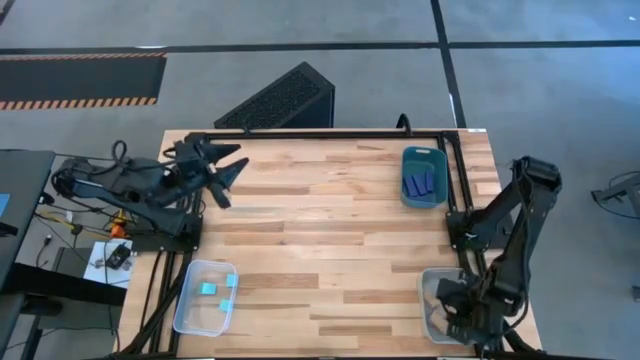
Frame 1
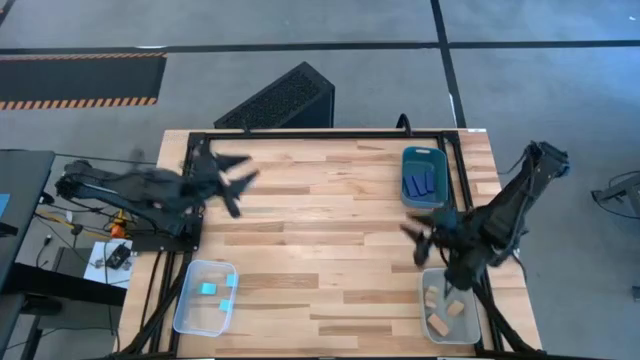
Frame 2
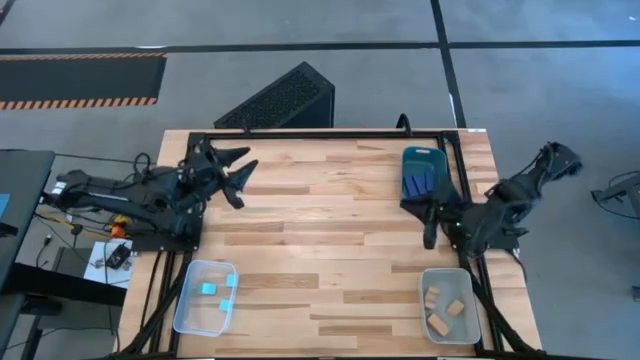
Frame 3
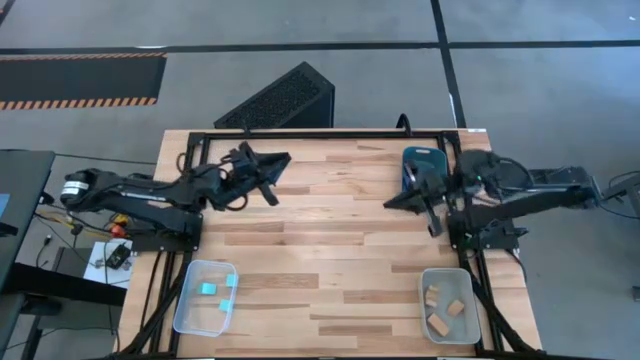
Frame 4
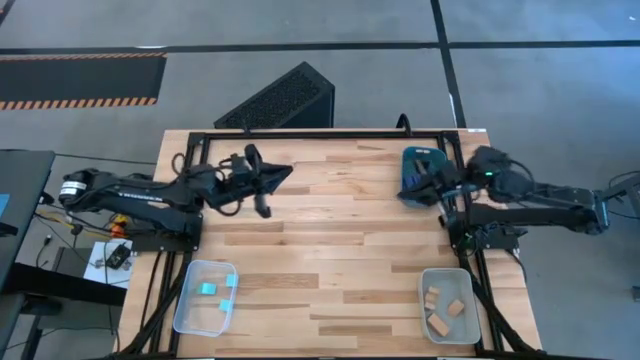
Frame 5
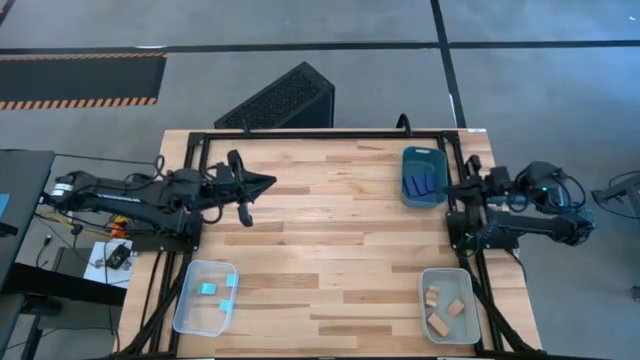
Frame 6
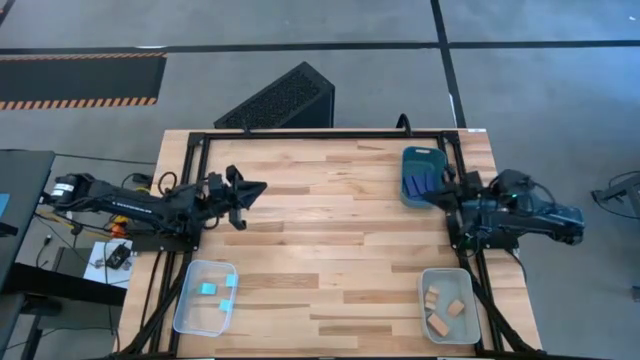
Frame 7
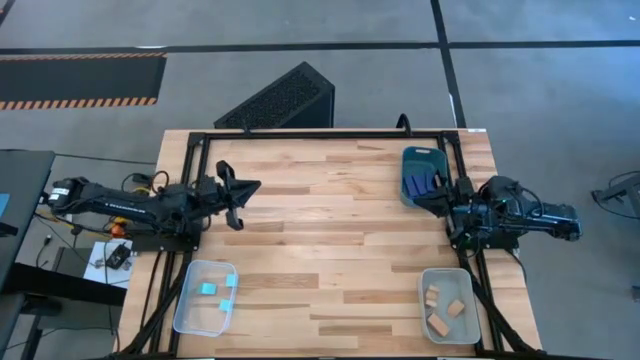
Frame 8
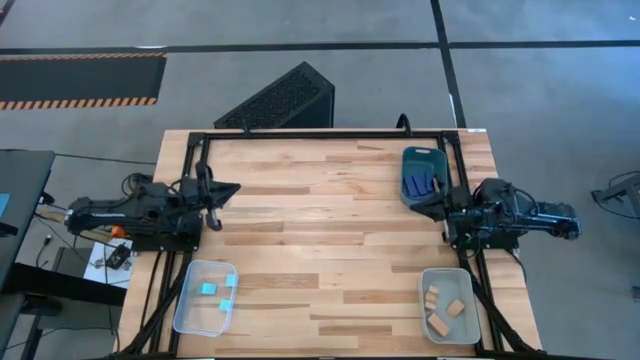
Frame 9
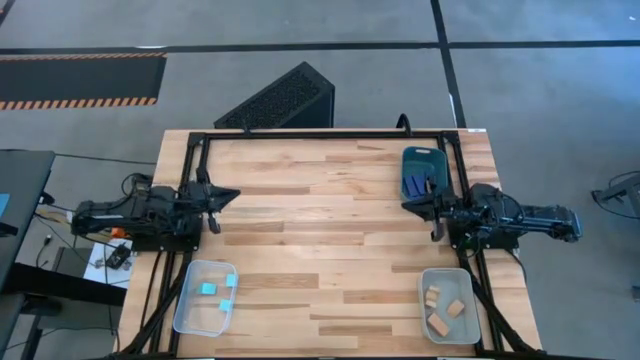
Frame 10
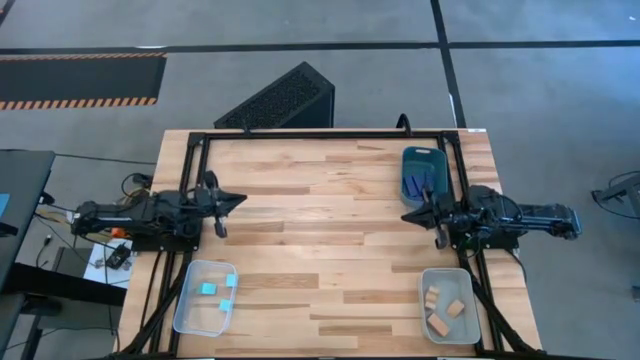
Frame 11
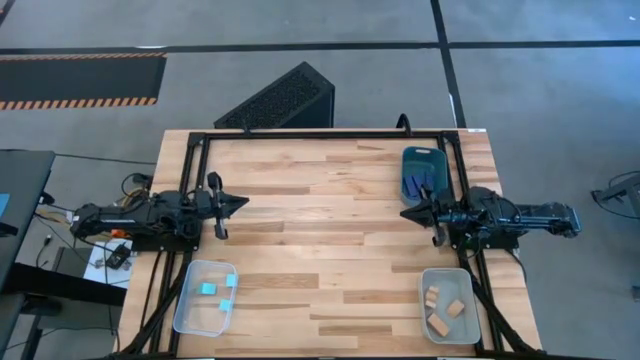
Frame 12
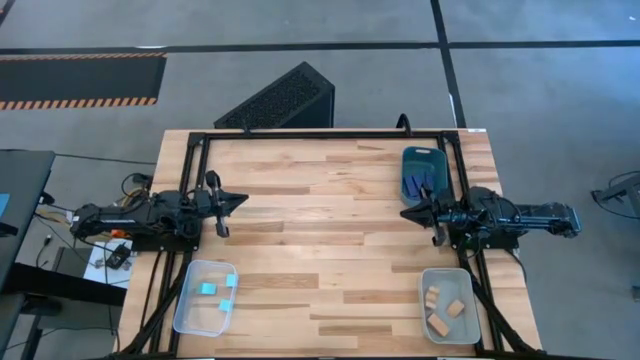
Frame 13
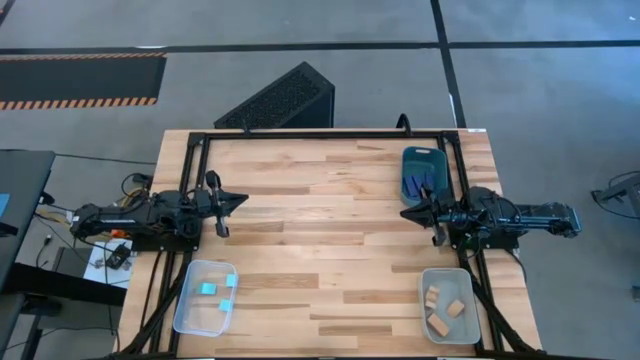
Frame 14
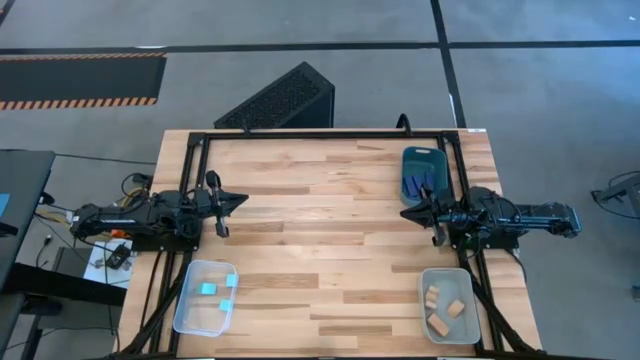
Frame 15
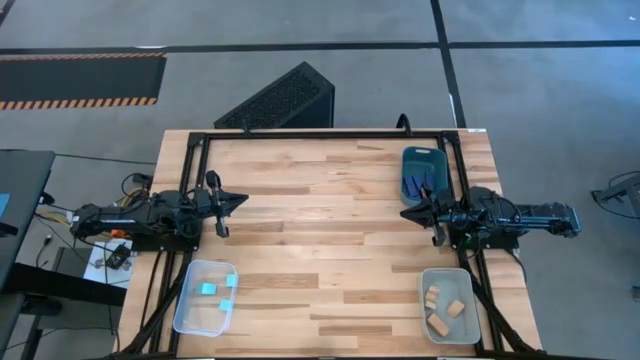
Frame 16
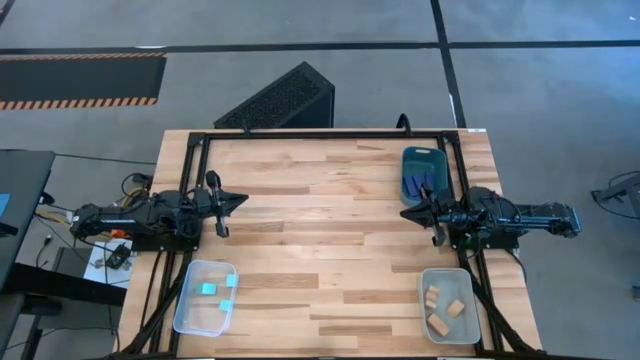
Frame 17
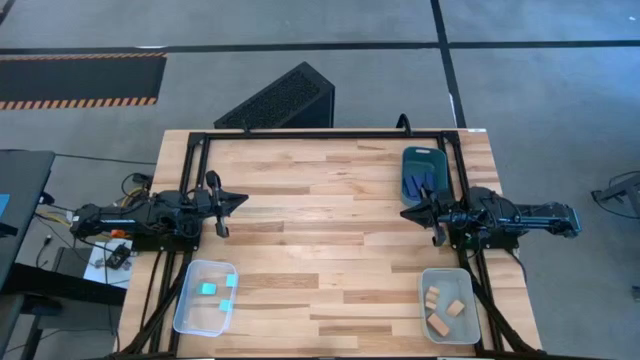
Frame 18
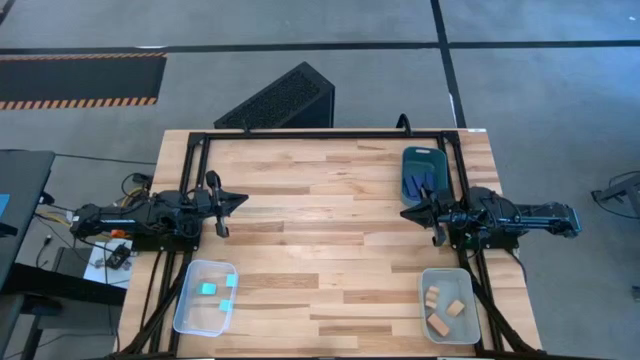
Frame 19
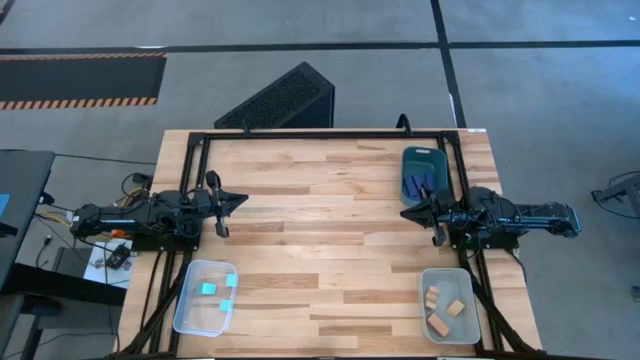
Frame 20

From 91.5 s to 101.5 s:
Task: Sort & place blocks by color
Return to Home Position

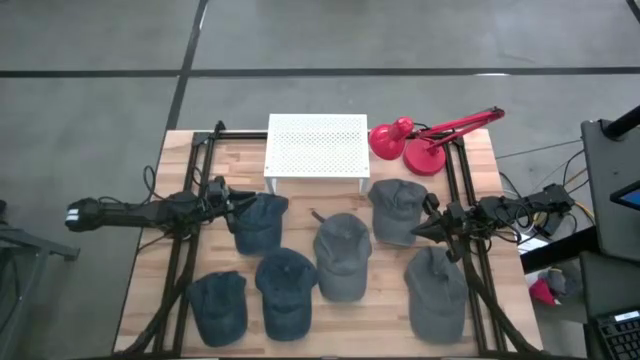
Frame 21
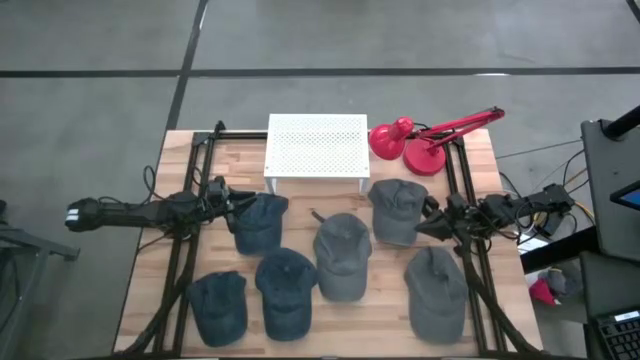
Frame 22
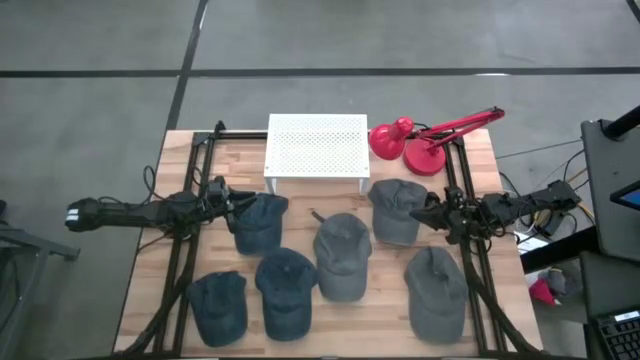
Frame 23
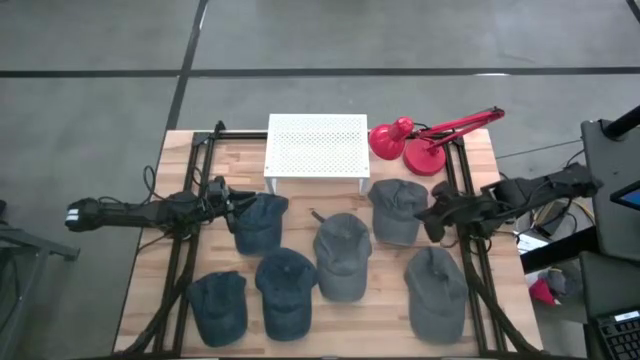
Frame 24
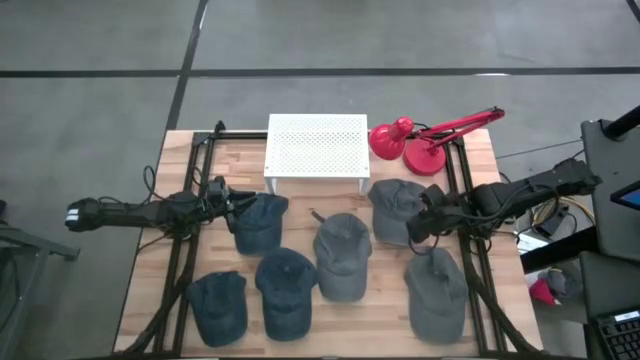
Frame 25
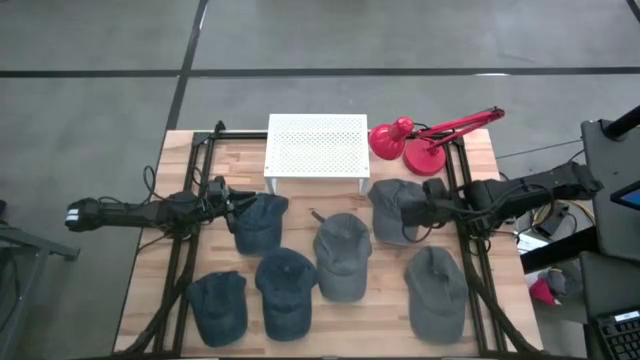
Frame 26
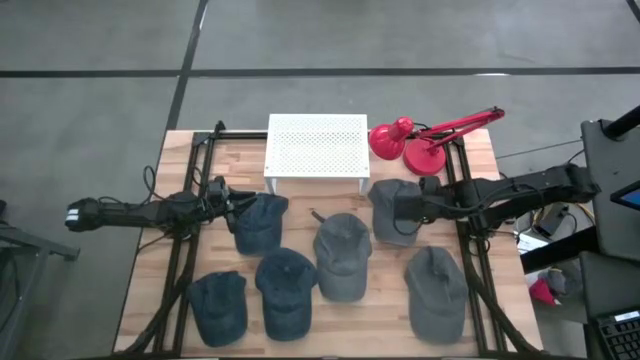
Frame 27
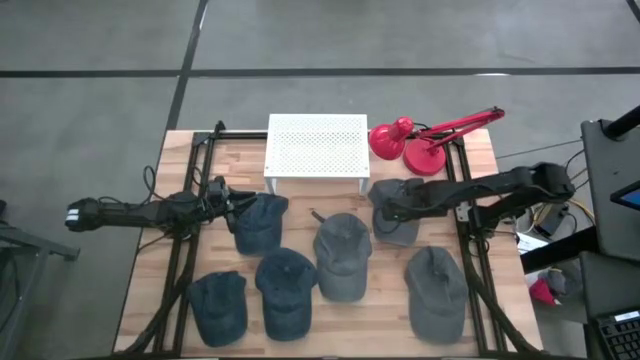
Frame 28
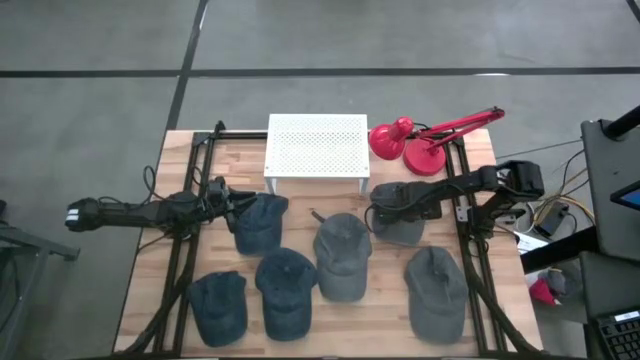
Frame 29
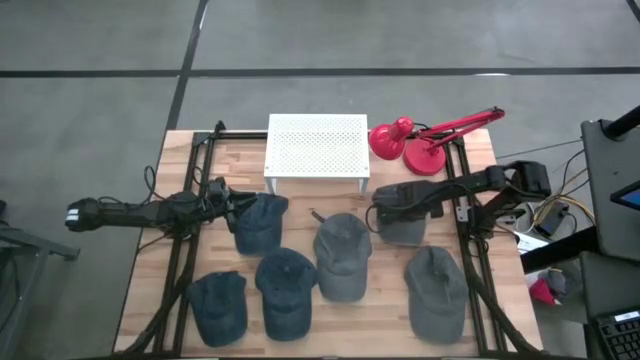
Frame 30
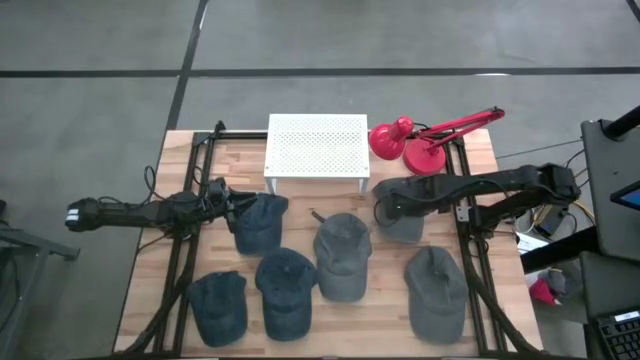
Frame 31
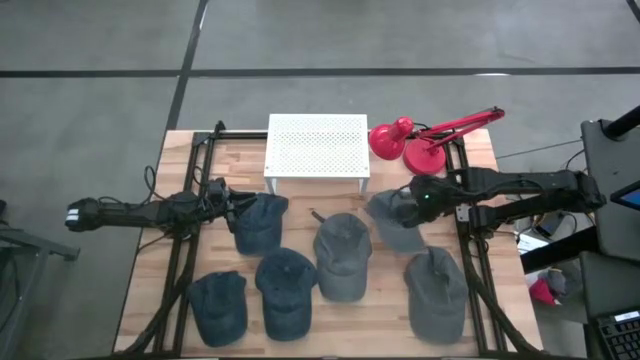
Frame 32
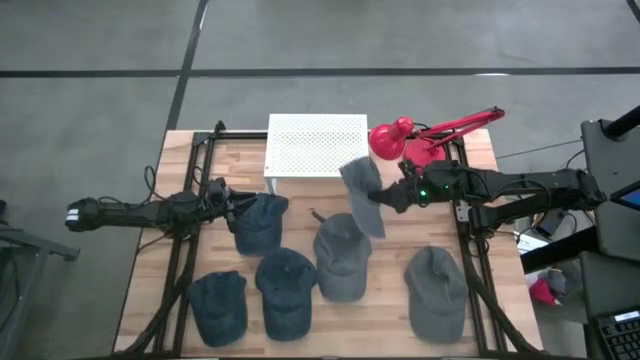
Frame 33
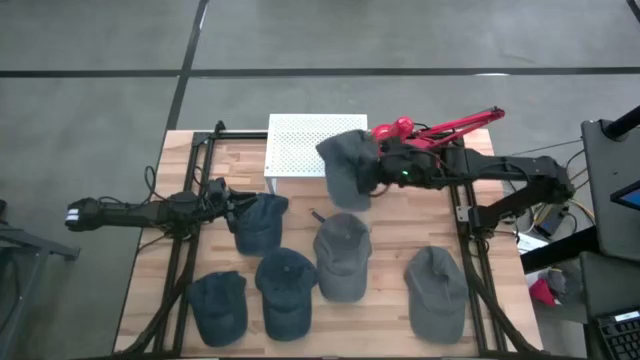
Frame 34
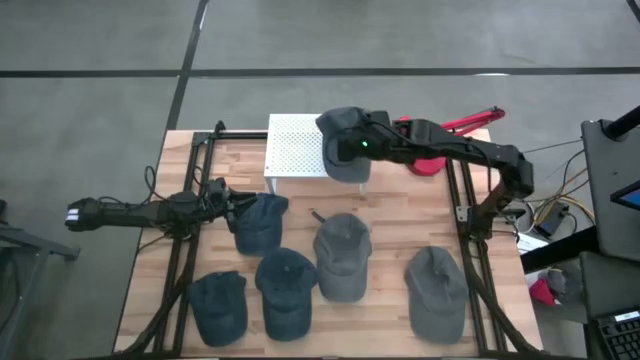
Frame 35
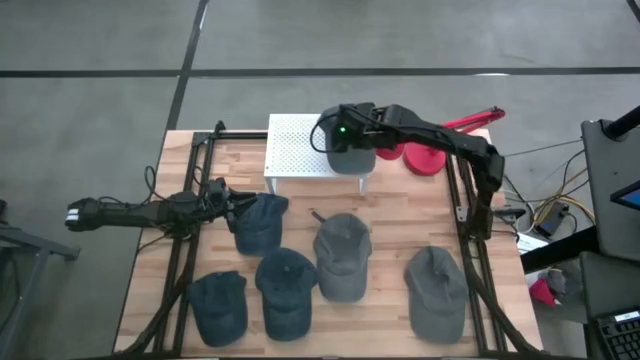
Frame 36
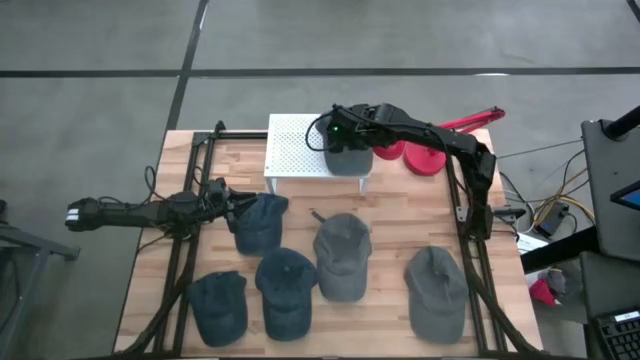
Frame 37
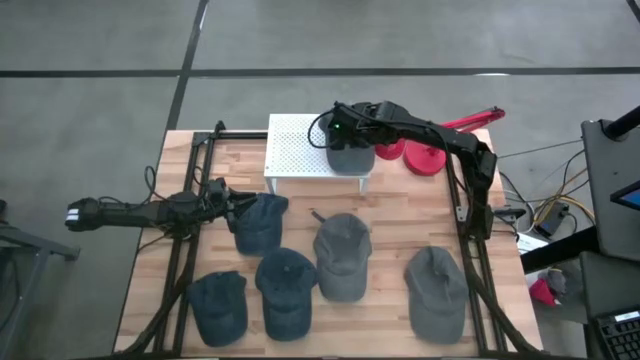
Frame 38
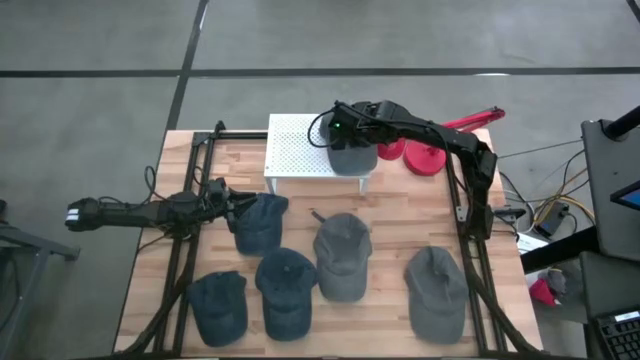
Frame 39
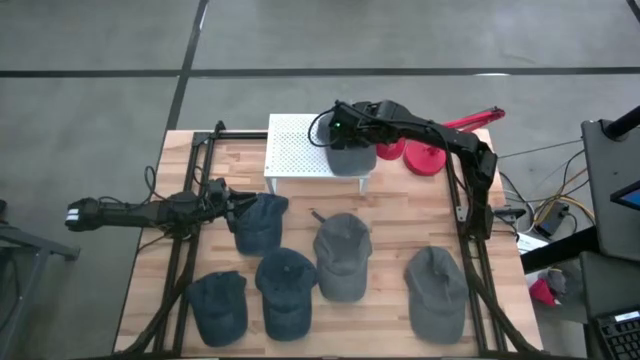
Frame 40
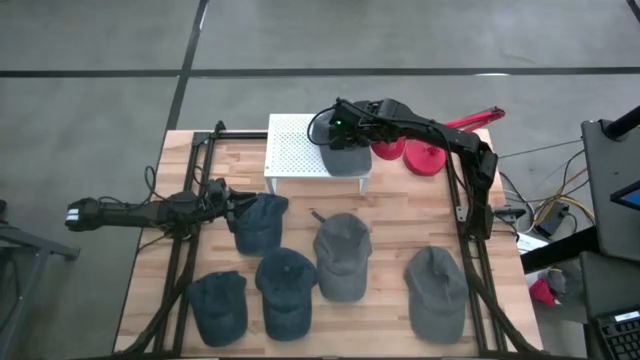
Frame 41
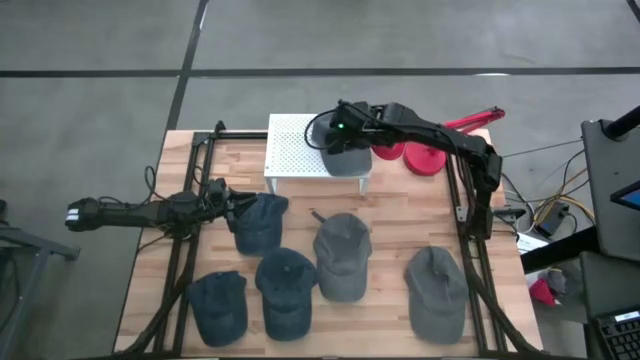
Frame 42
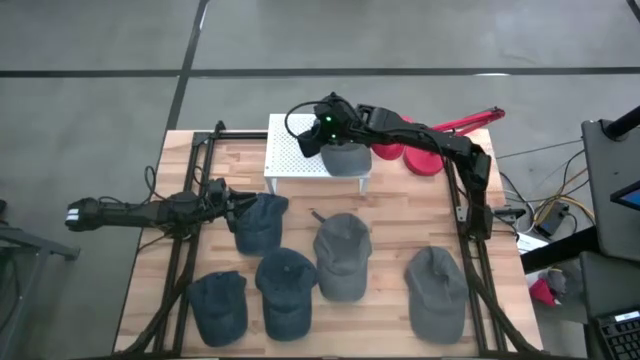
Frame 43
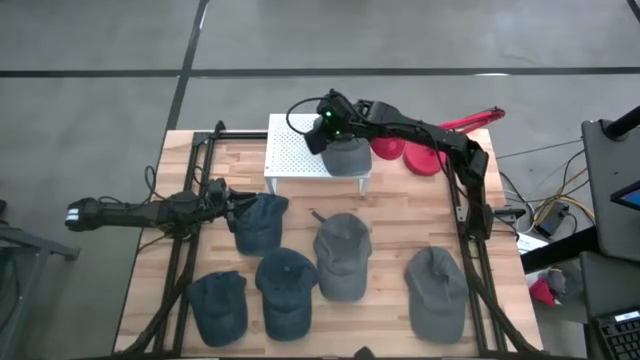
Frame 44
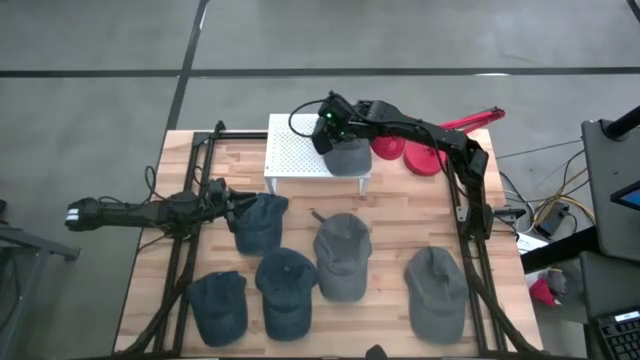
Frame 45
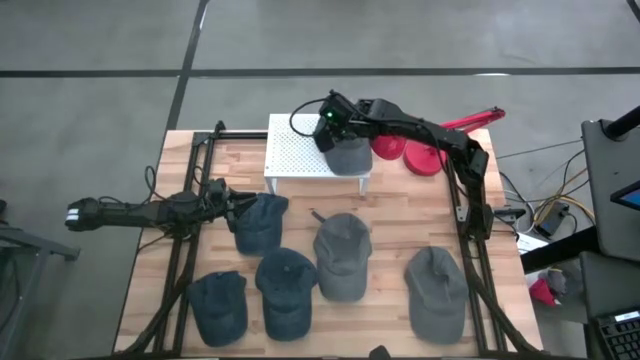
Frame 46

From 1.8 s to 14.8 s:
Task: Pick & Place hat
Put the top gray cap on the shelf
